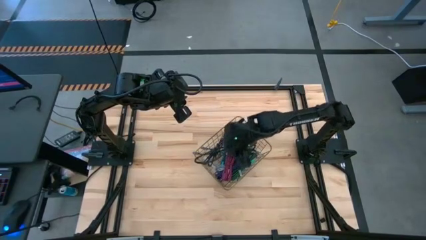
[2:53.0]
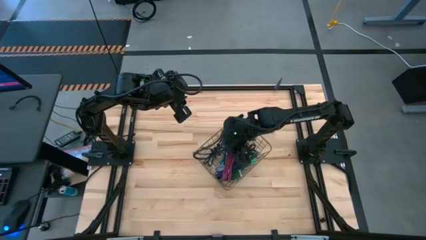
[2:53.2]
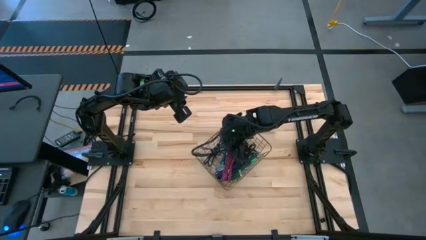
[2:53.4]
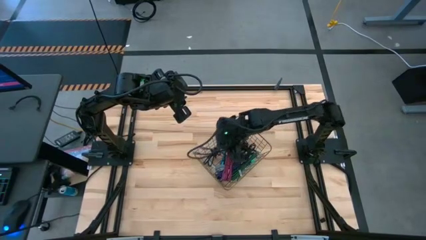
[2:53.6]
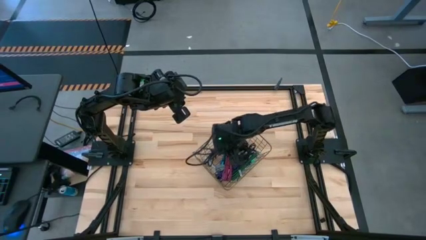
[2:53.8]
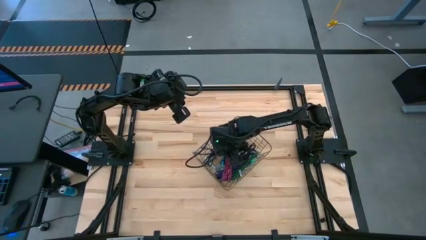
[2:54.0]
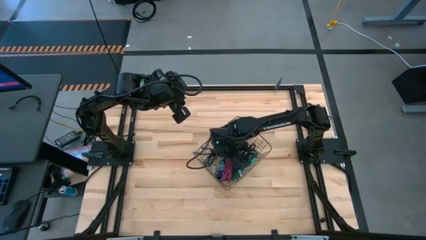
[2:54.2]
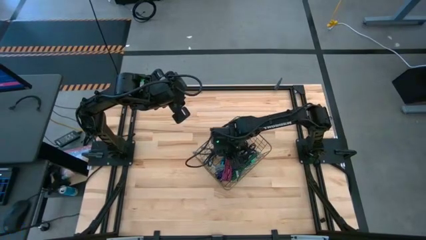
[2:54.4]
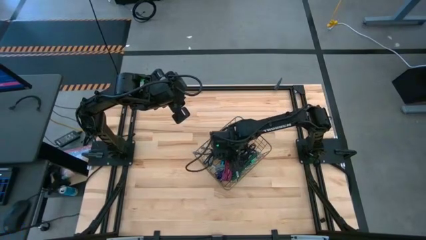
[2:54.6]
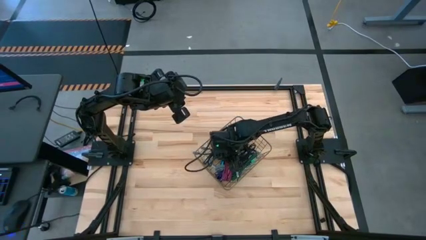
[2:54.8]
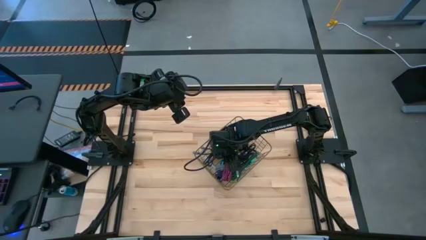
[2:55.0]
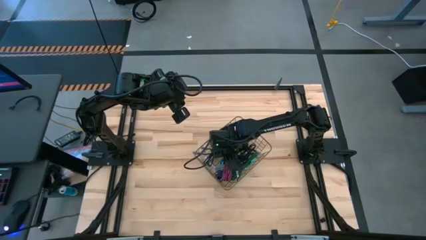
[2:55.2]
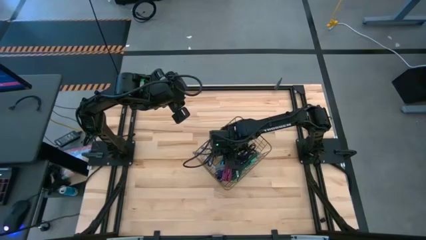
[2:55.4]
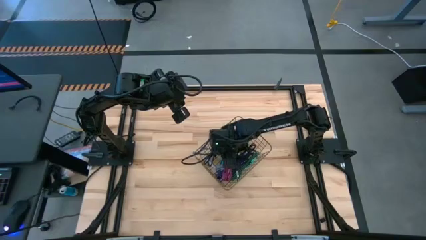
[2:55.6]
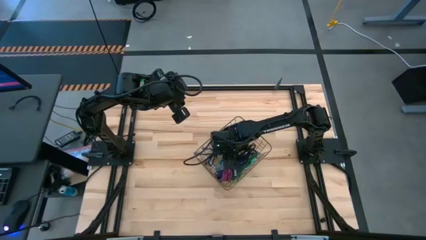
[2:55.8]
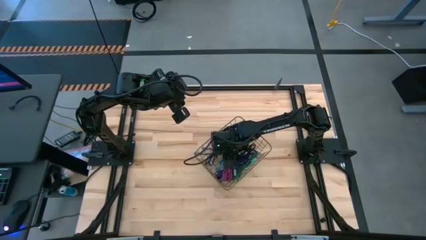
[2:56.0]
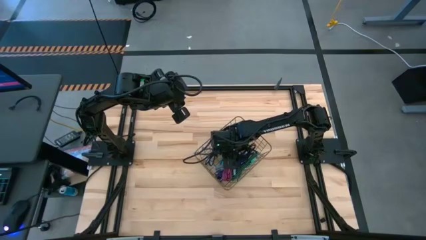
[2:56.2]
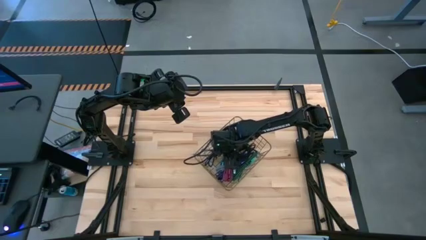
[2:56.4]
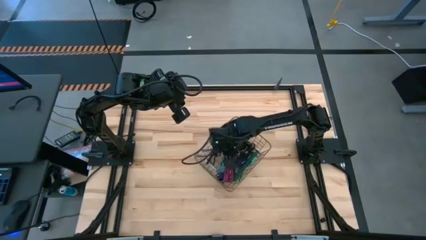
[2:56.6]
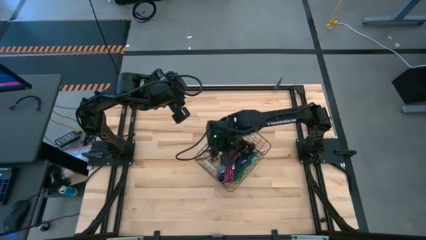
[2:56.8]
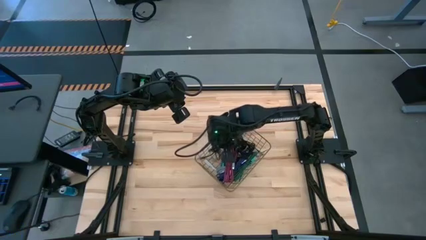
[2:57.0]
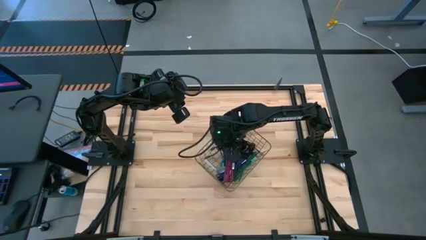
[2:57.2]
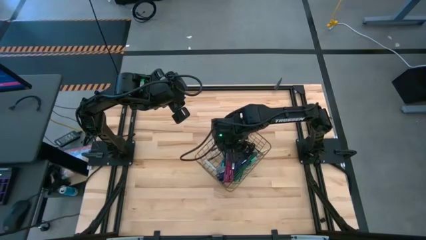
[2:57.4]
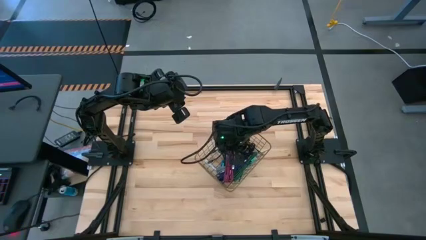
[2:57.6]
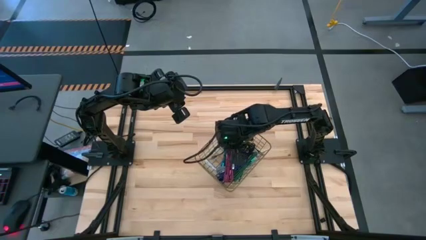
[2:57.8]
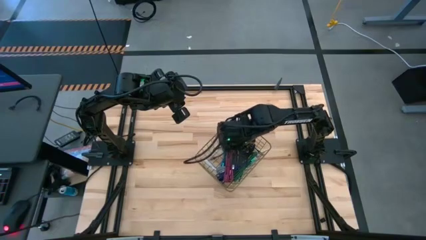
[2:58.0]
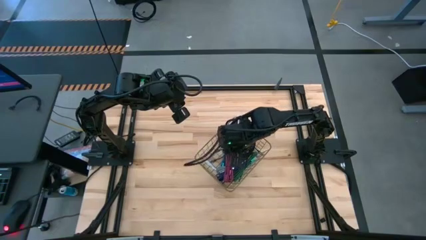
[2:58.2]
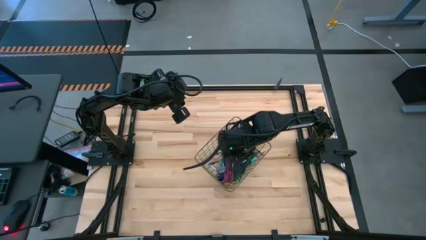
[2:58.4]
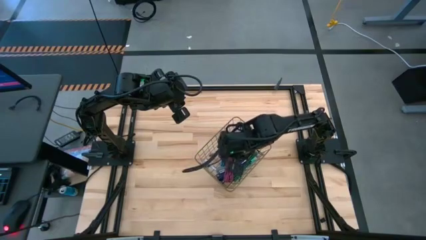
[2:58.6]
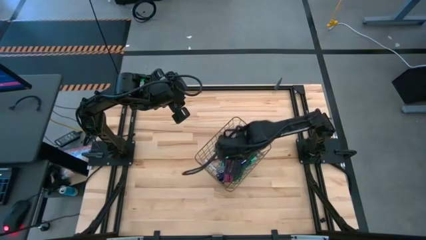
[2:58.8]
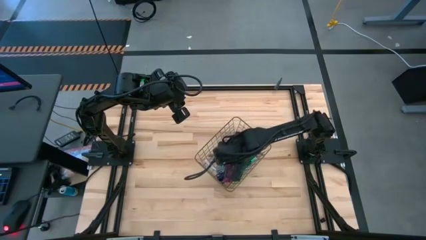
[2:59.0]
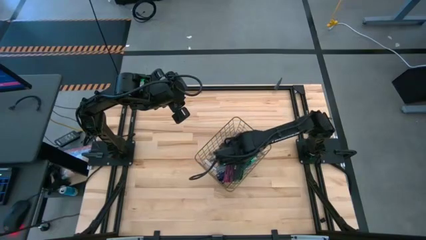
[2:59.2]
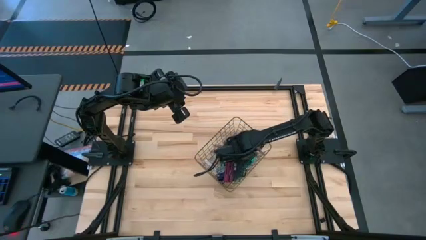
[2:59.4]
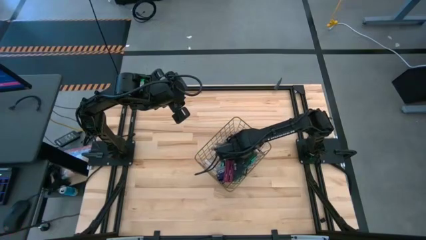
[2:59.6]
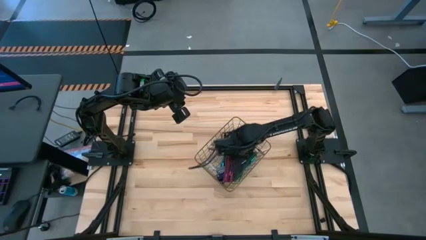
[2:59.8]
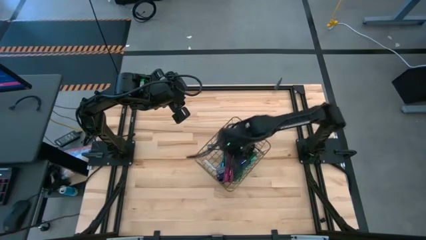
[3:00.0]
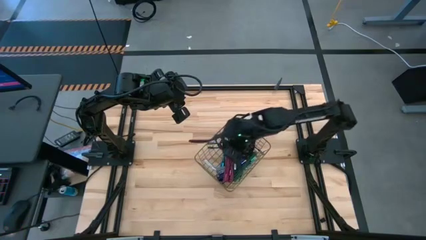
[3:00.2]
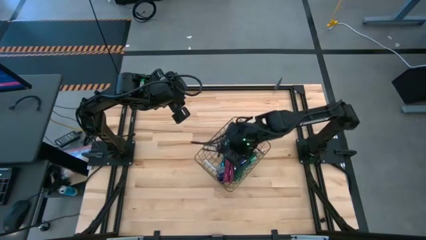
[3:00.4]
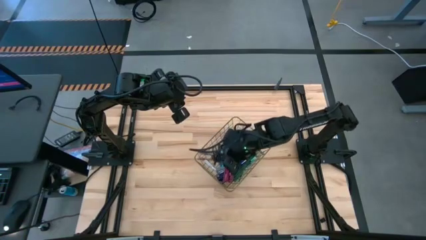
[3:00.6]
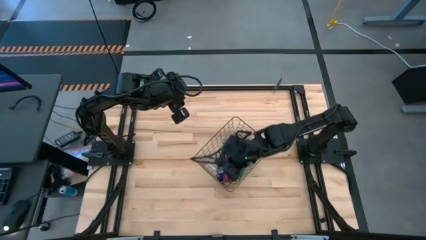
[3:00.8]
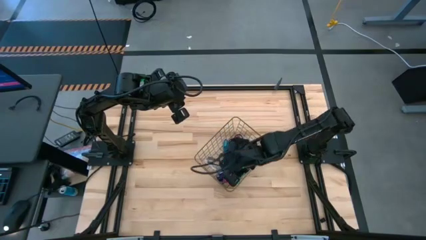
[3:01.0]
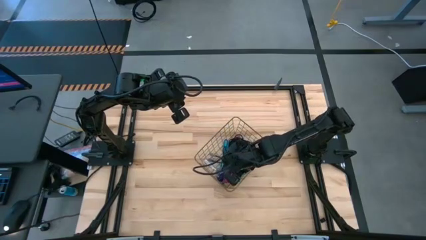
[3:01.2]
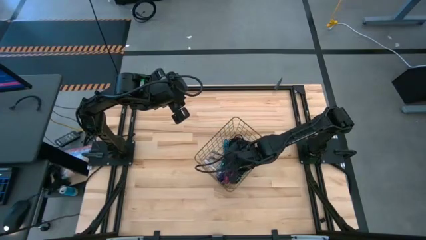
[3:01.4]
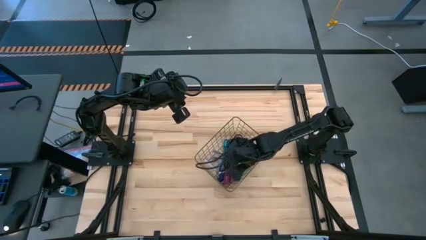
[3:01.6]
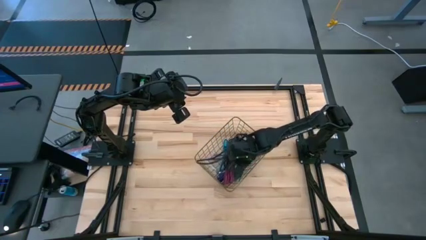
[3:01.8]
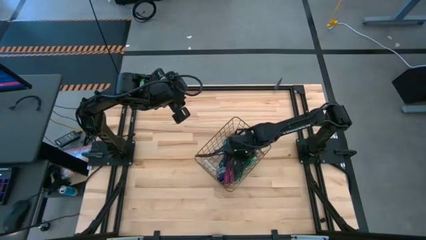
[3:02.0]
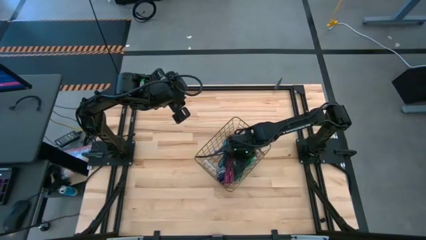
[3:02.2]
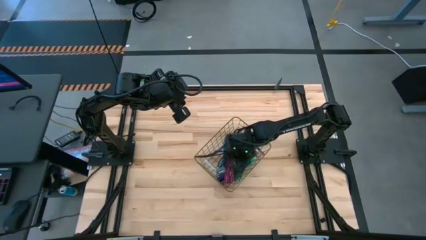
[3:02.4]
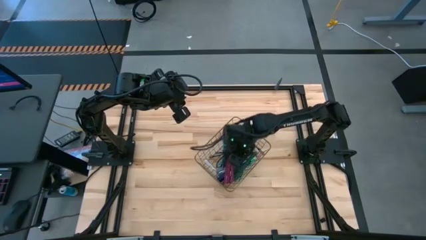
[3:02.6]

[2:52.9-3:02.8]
Task: Pick and place USB-C Cables
Adjust the black charger cable

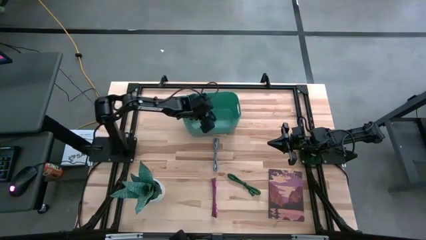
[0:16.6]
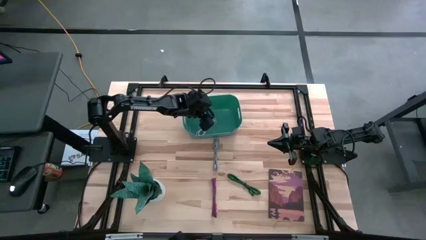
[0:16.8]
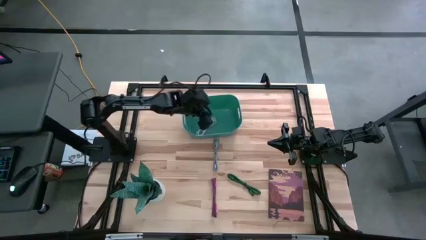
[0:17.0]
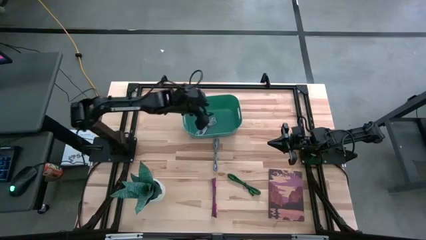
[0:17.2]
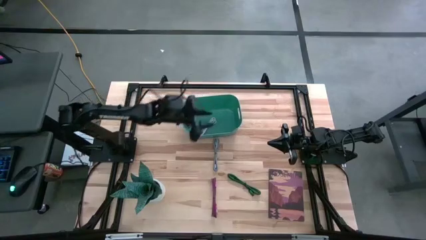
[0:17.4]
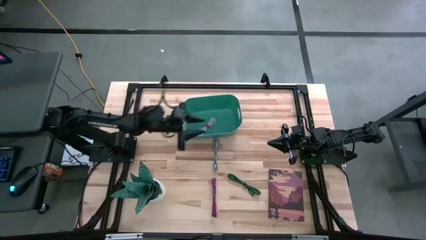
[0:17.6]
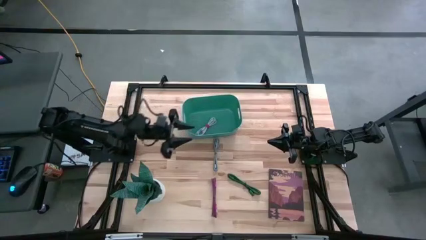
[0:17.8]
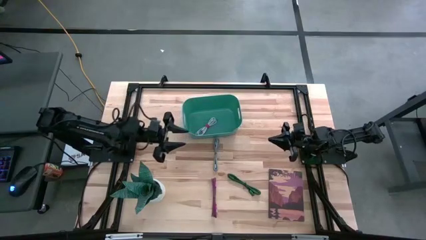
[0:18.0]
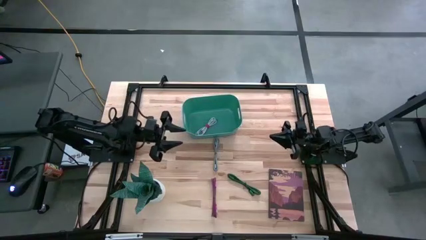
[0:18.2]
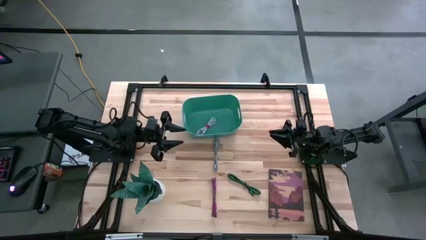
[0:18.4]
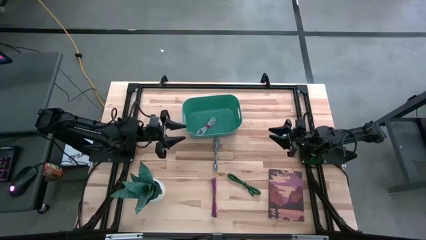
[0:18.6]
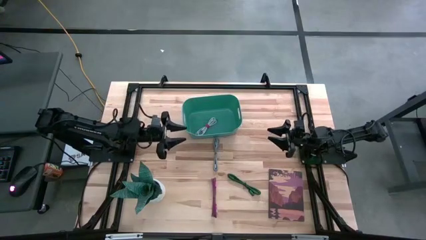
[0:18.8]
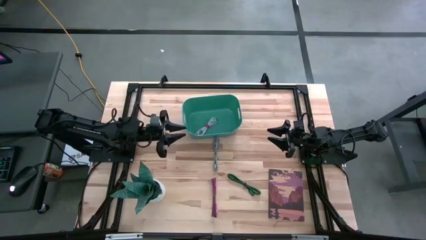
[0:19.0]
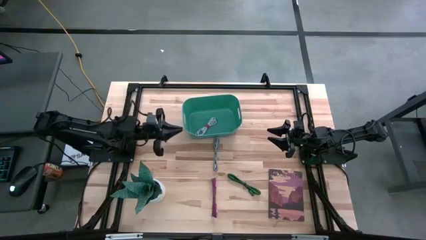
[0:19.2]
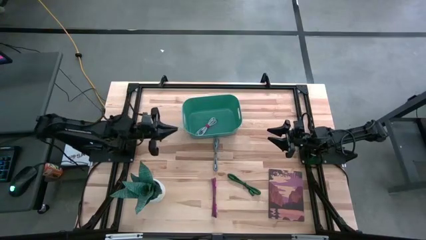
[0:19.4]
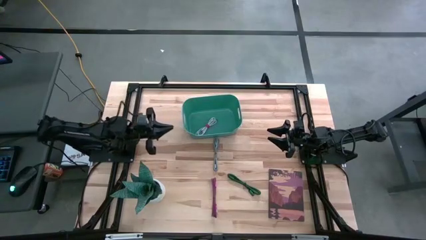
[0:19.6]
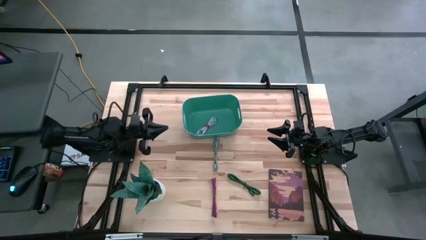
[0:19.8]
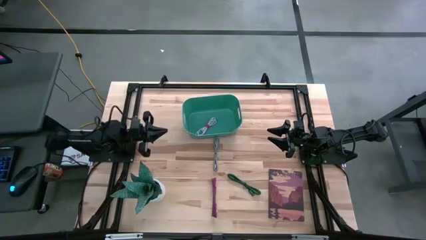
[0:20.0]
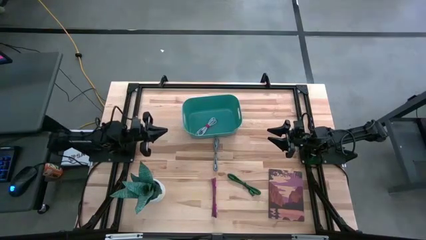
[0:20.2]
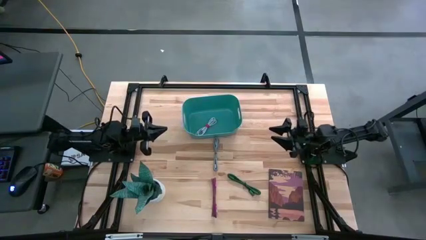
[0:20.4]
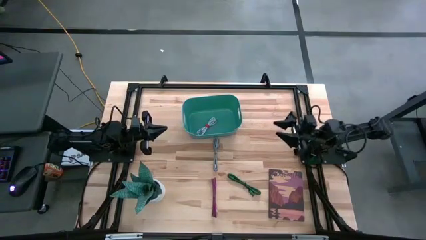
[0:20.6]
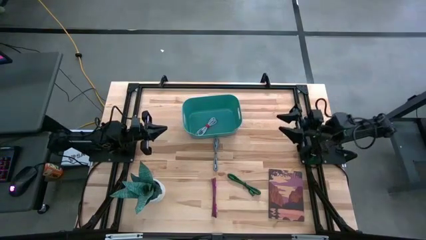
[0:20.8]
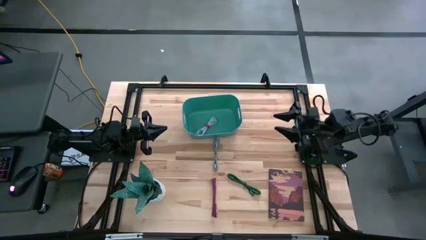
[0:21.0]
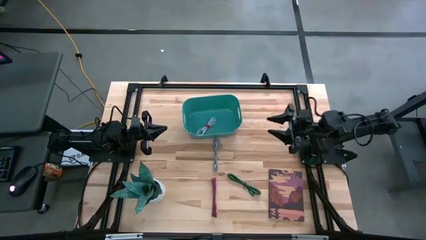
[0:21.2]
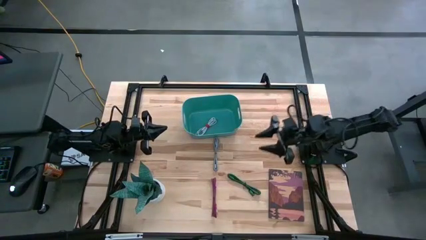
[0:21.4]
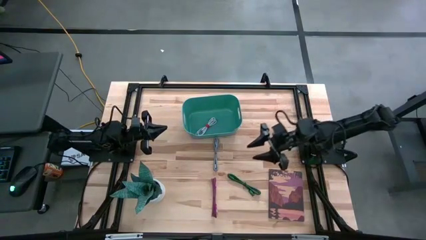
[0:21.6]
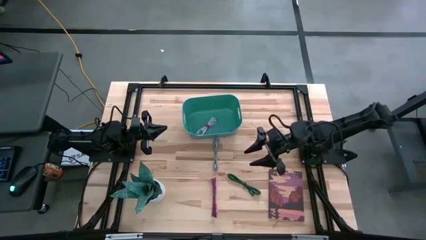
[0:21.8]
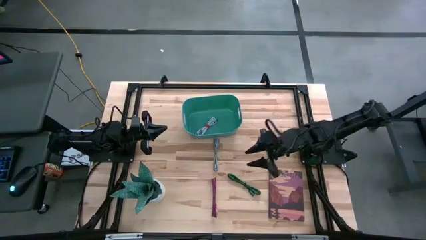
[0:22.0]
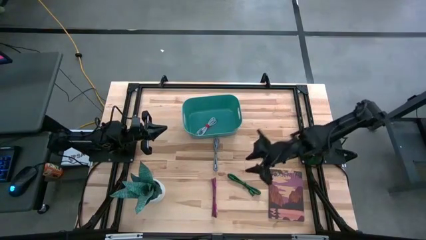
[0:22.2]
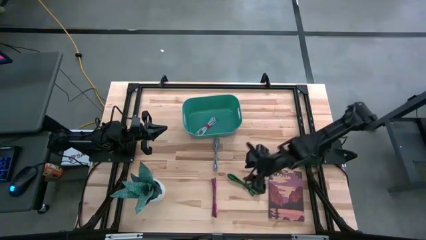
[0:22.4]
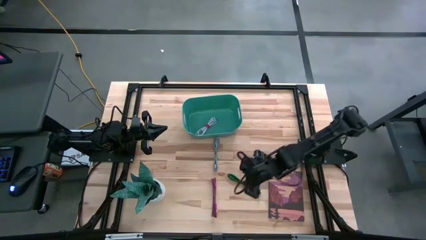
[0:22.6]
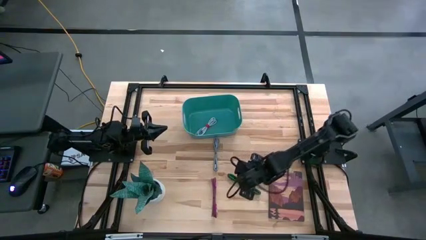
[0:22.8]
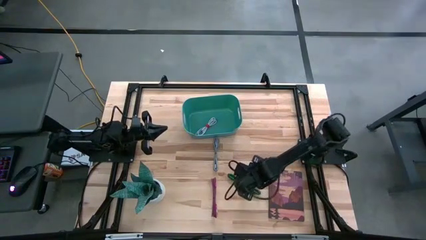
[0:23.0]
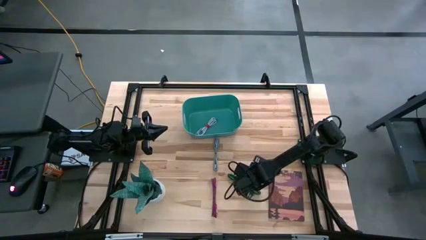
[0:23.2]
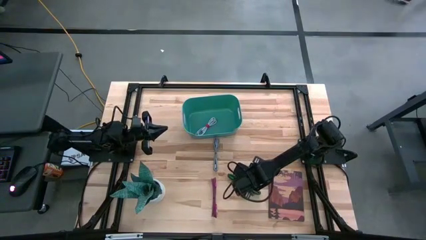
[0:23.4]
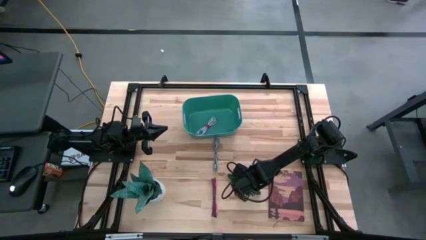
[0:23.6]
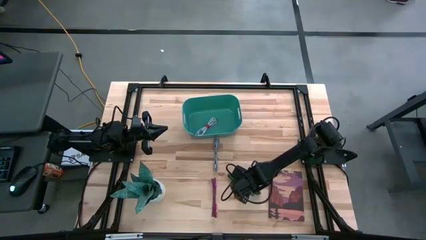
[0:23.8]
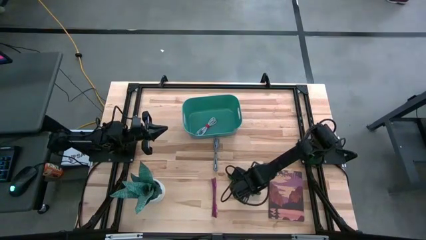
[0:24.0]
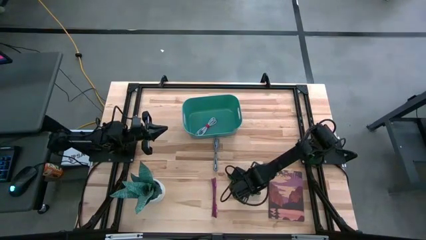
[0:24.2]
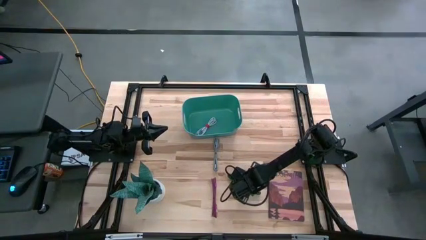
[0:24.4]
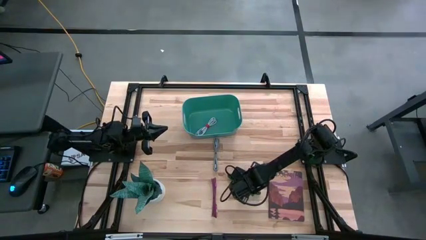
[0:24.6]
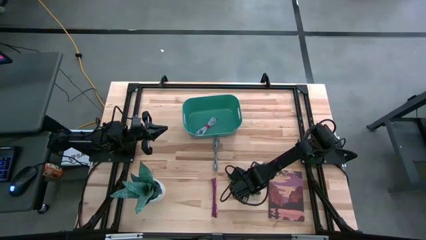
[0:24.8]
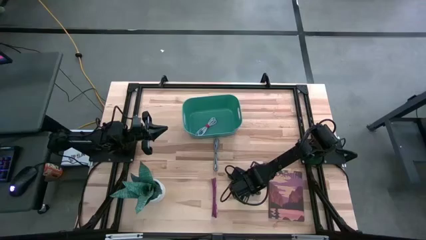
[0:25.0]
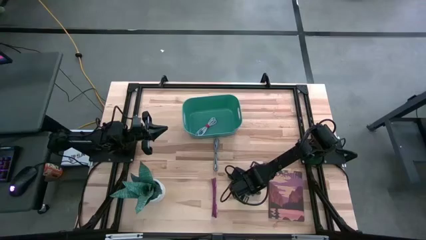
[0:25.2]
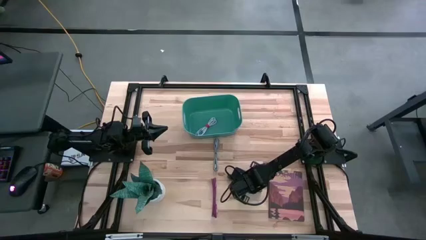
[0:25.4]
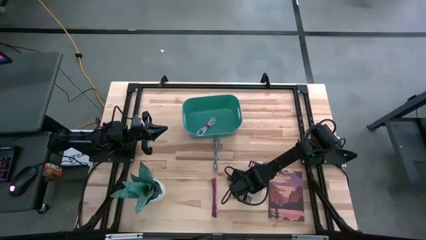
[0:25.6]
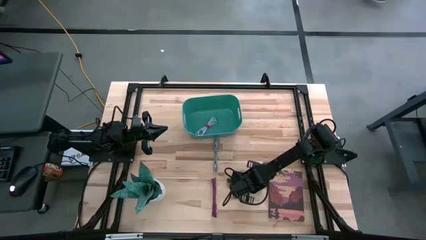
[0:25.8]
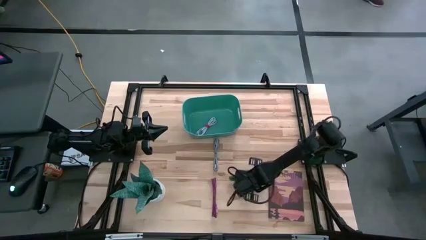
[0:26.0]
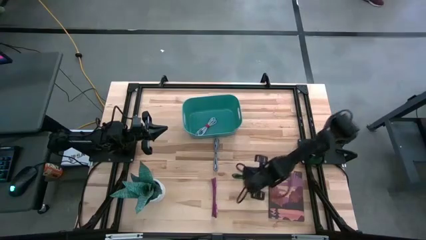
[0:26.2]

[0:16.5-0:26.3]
Task: Pick and place USB-C Cables
Put the green and black charger cable into the green bin
